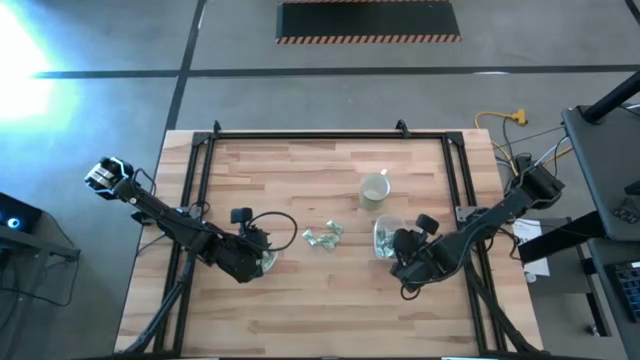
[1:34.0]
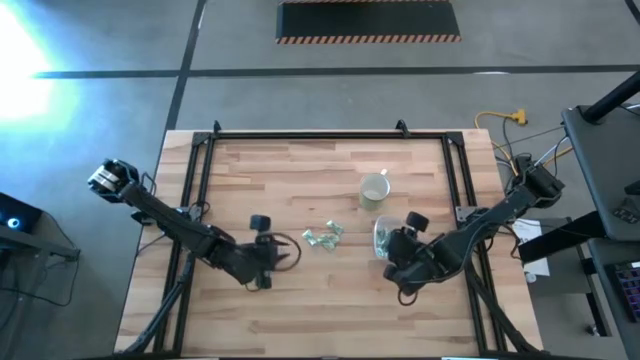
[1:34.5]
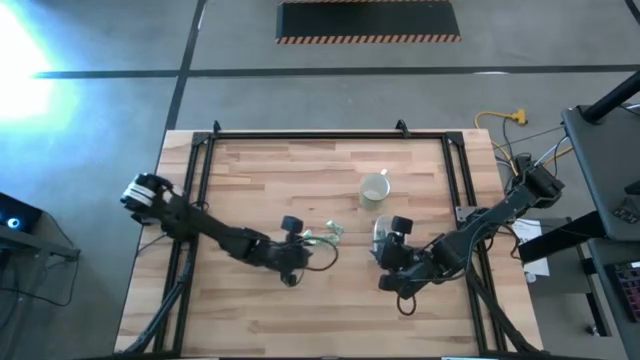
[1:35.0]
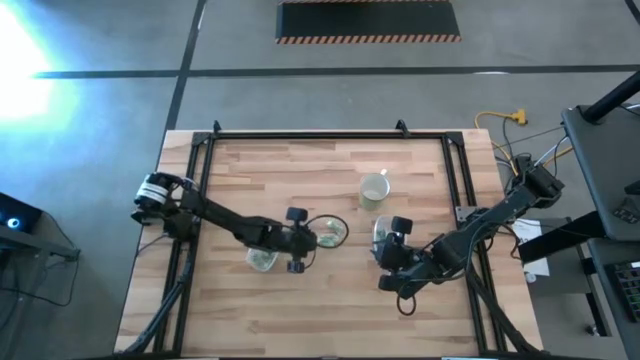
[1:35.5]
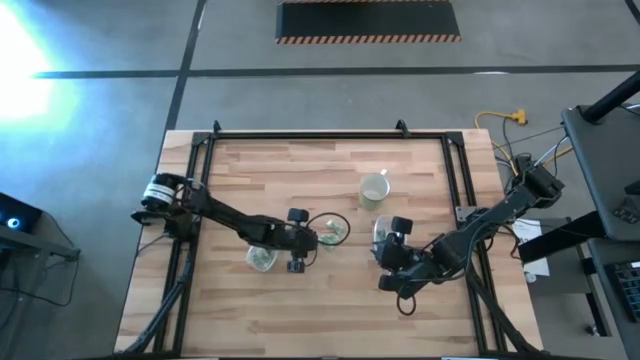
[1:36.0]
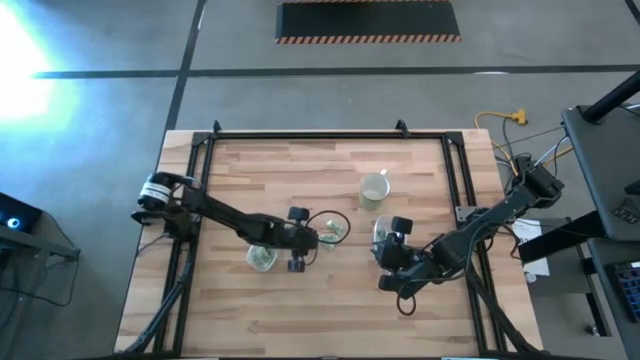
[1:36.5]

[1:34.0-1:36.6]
Task: Pick and place Stevia / Truvia into bins
Put the stevia packet into the left transparent container

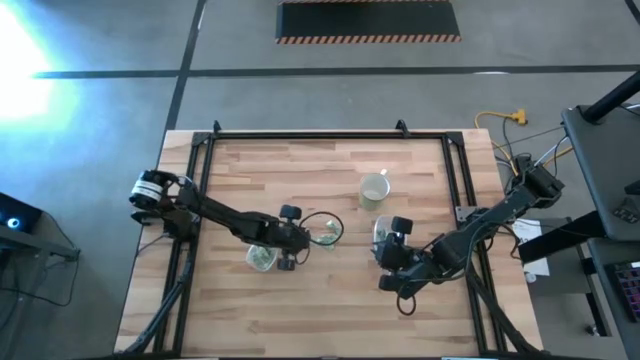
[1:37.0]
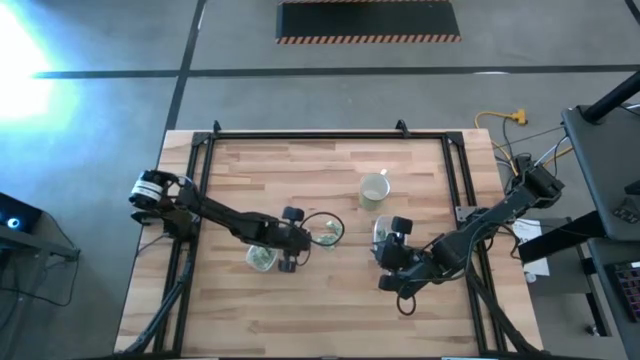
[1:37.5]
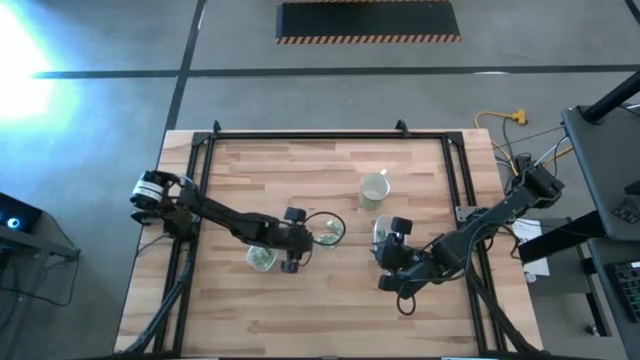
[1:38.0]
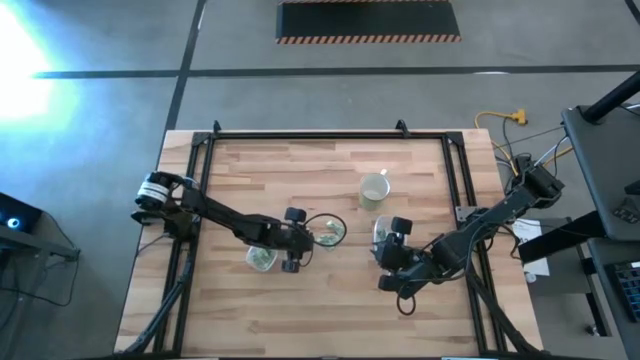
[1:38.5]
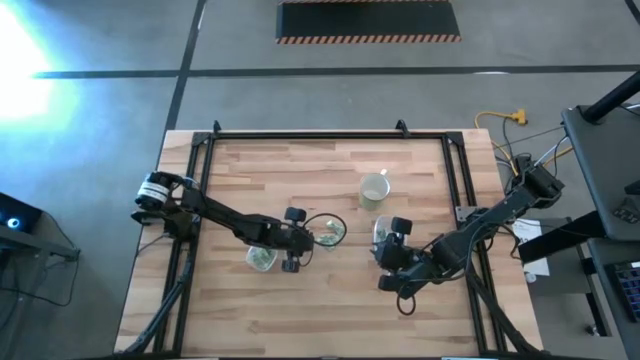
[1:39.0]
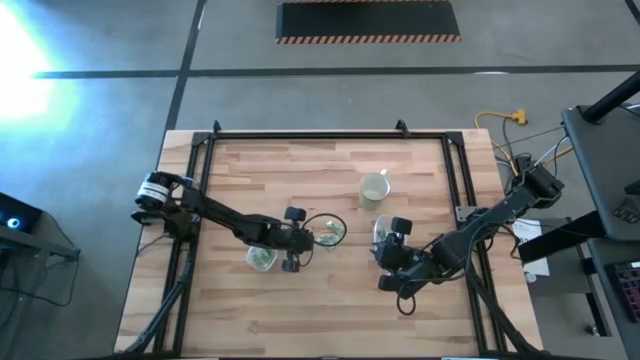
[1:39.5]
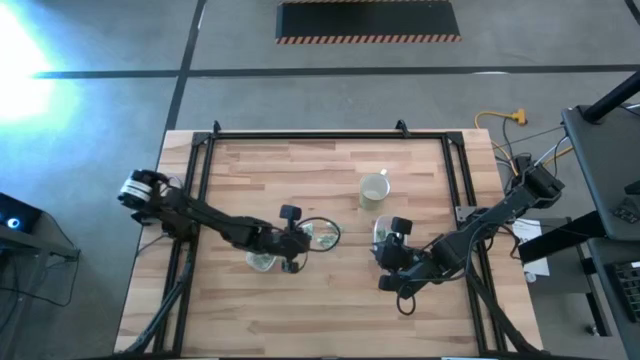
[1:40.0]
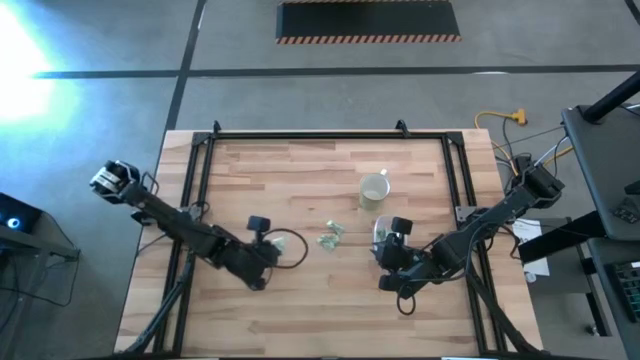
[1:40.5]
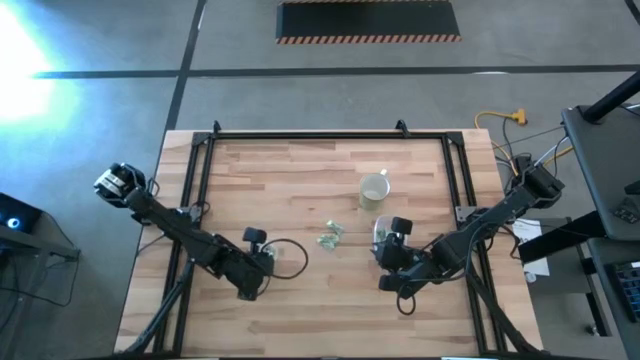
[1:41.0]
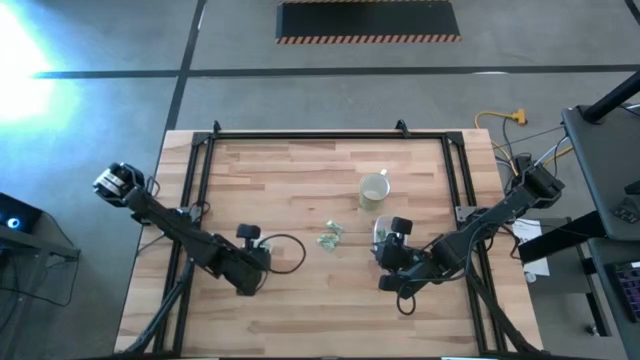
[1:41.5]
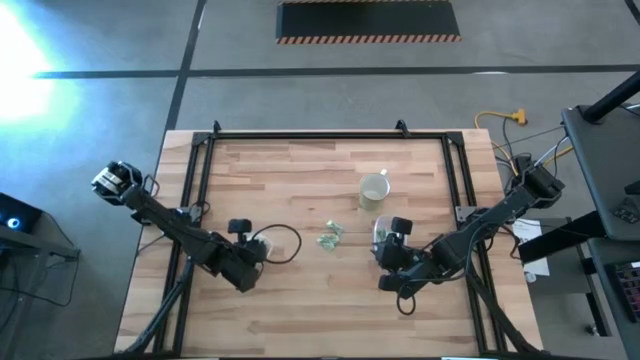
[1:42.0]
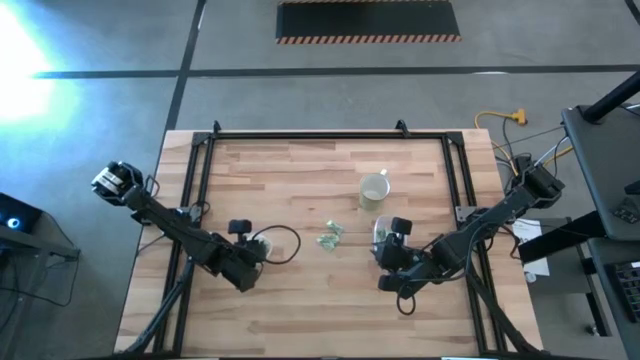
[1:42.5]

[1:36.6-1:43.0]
Put the stevia packet into the left transparent container

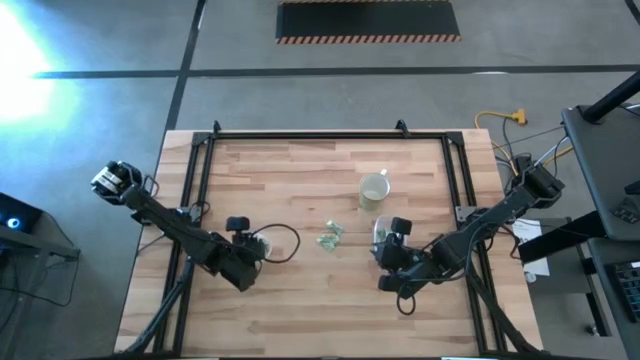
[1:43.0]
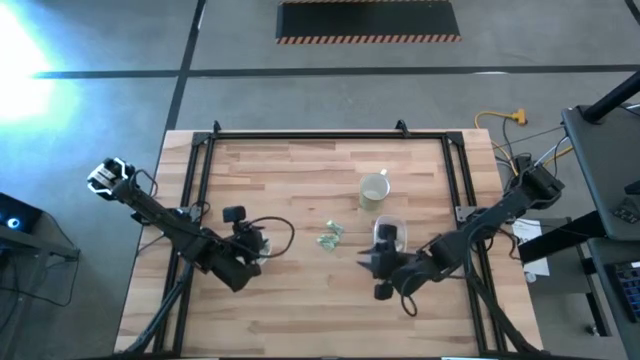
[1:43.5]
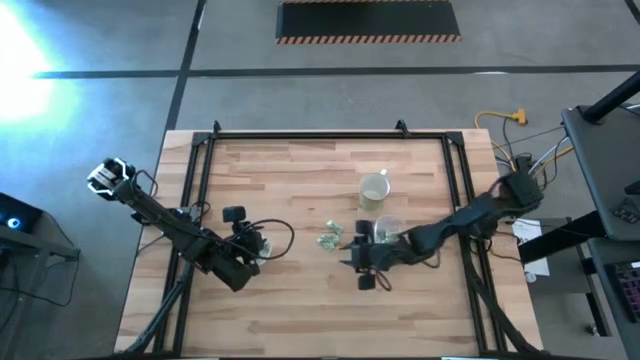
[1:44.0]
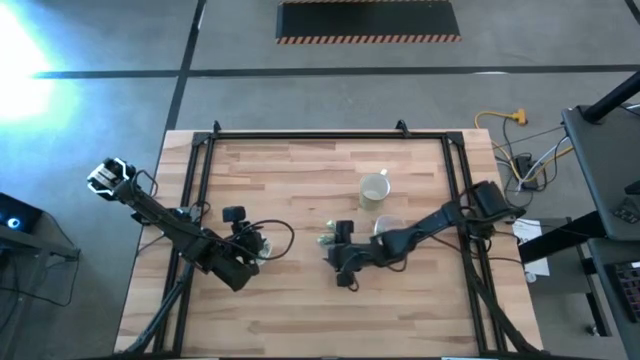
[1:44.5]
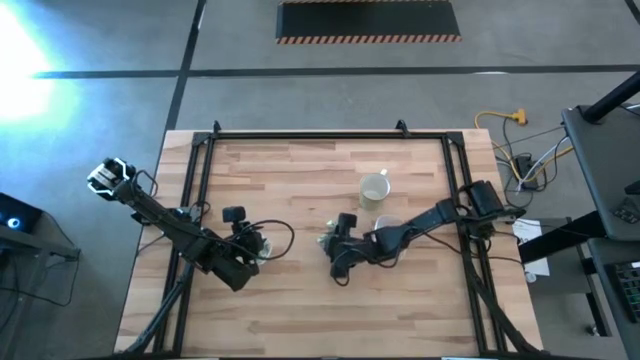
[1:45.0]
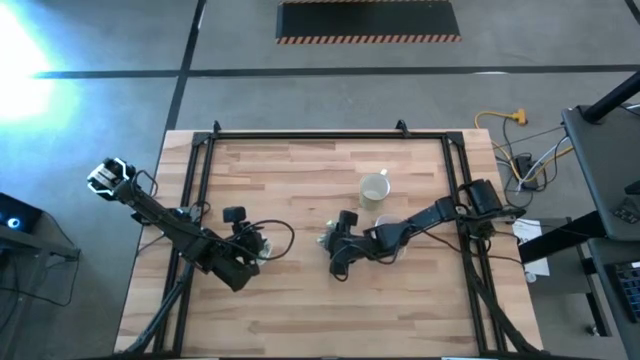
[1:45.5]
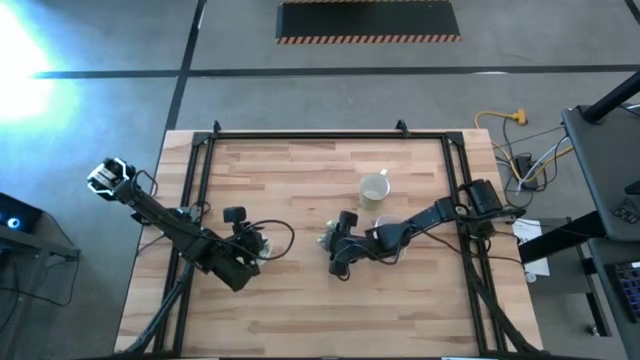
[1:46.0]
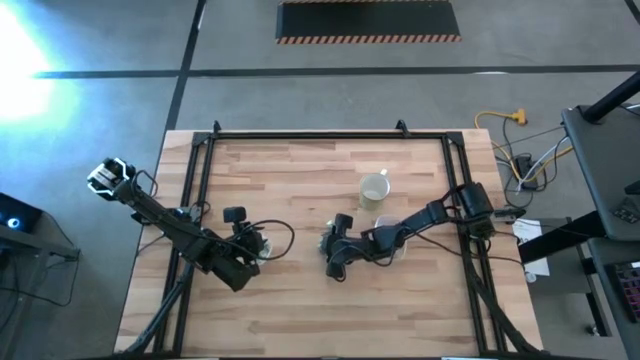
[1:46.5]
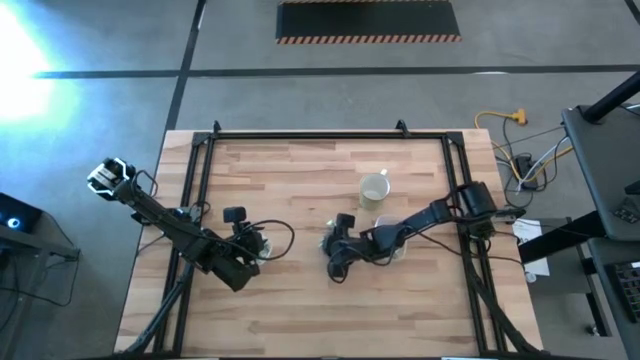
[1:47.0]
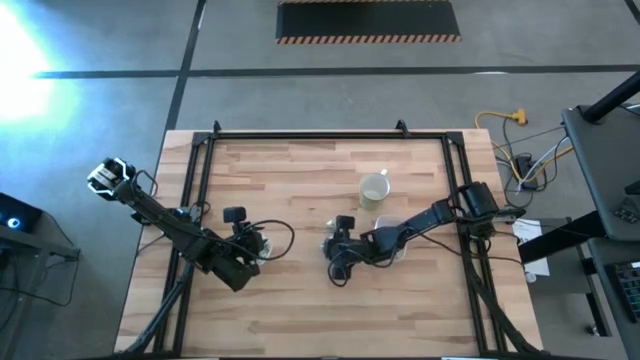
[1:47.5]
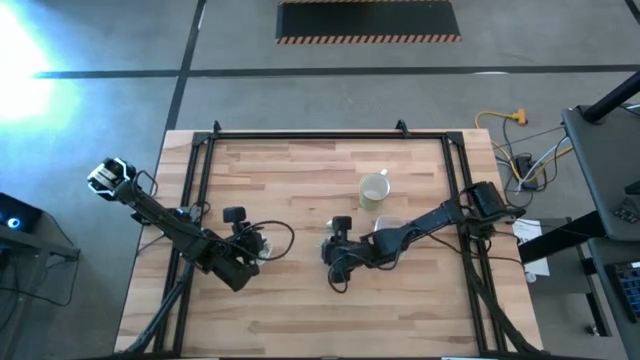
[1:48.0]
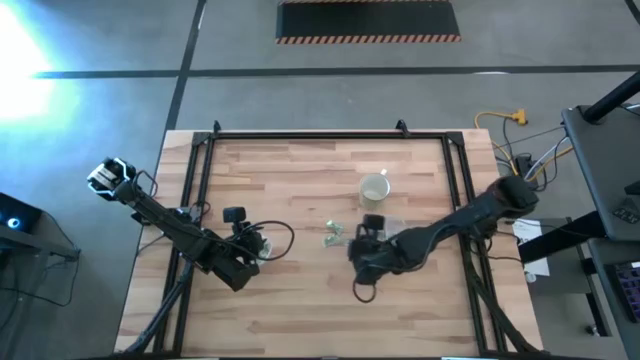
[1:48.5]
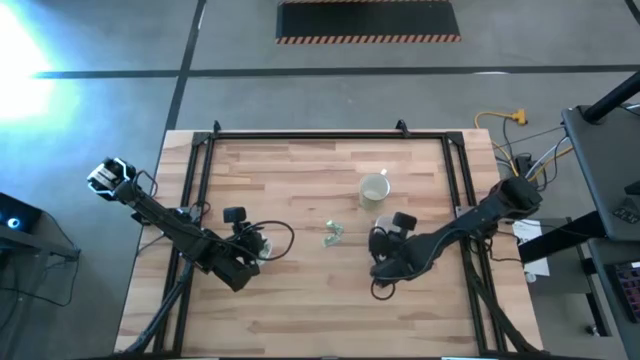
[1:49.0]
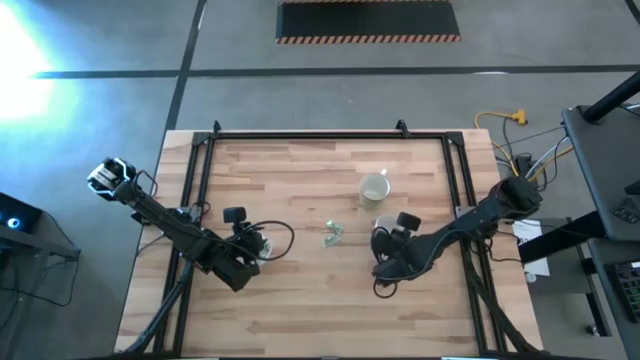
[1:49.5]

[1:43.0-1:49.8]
Put the stevia packet into the right transparent container

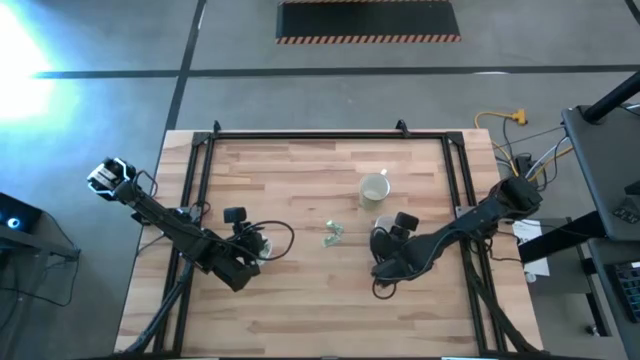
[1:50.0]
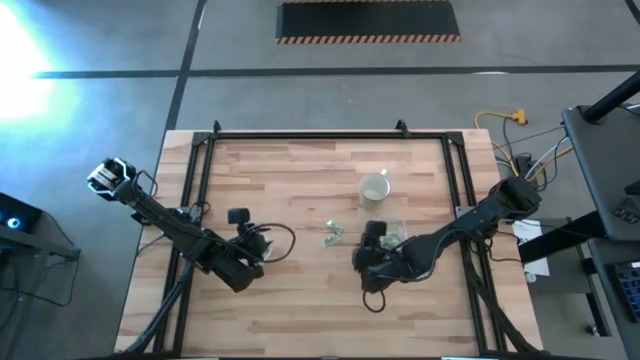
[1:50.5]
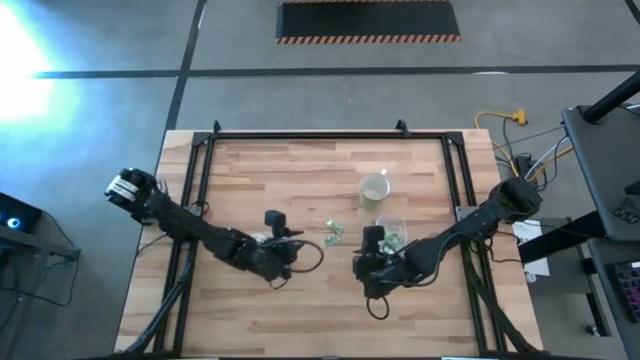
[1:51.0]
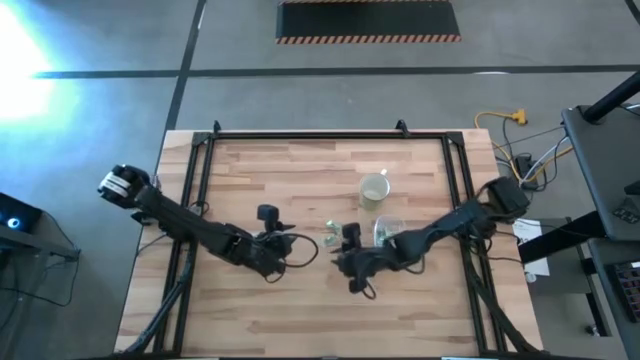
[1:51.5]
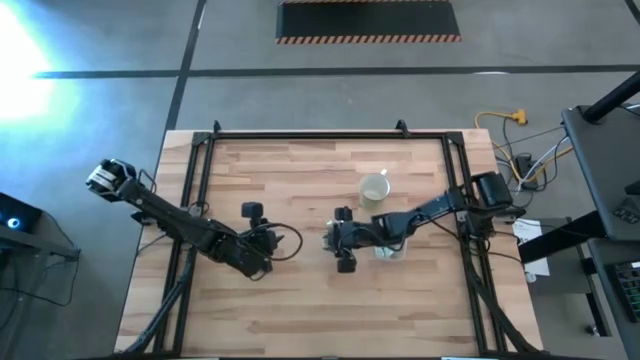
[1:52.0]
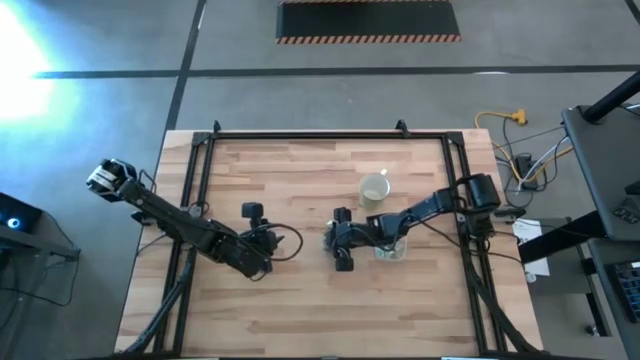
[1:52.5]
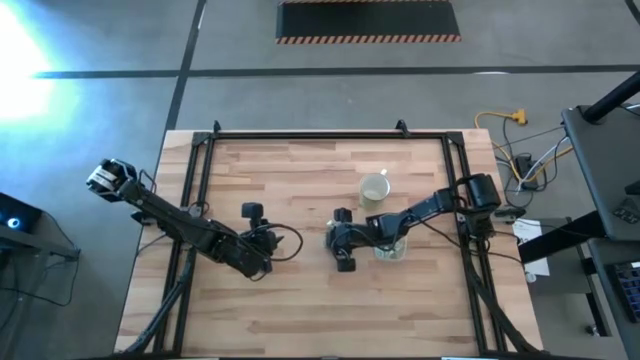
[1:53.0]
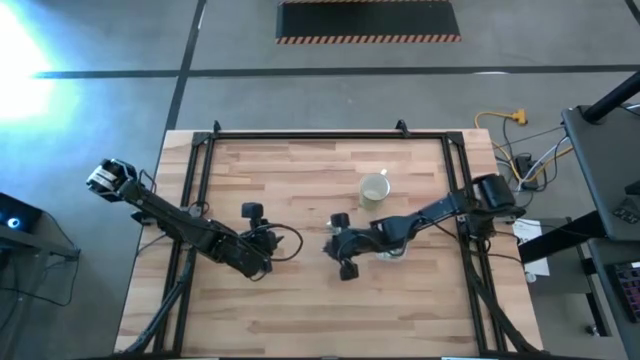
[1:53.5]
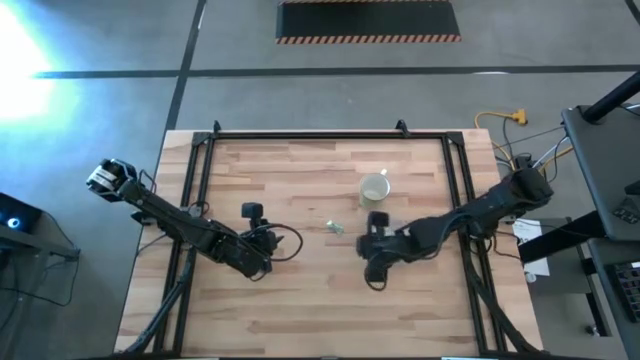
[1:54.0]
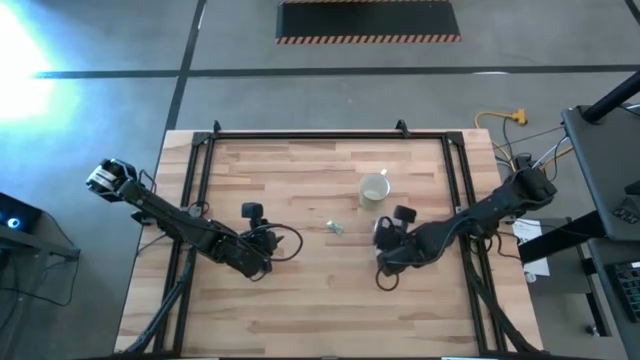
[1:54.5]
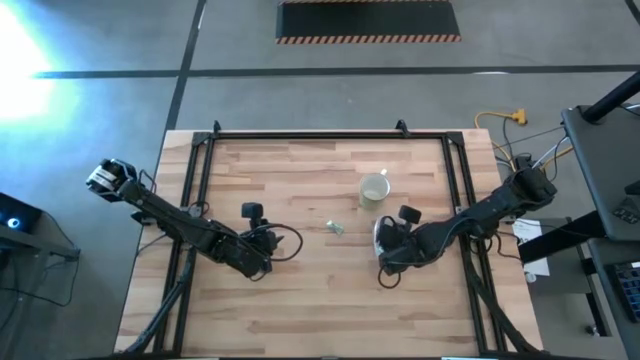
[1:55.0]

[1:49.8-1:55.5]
Put the stevia packet into the right transparent container
